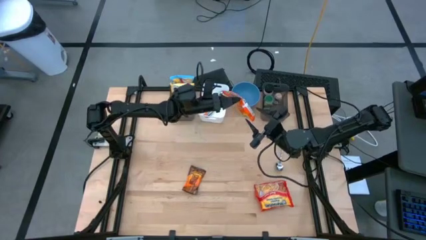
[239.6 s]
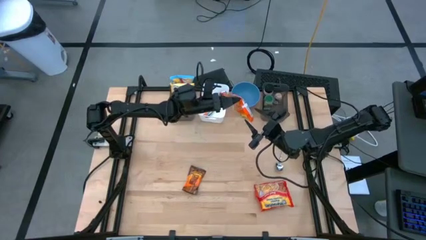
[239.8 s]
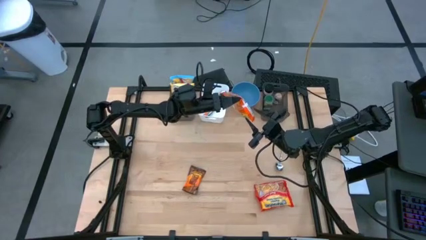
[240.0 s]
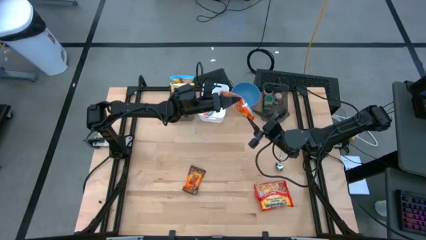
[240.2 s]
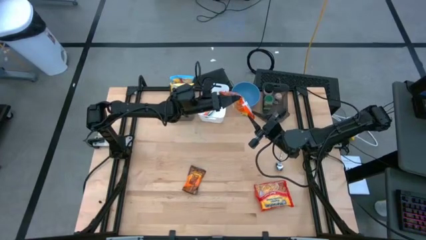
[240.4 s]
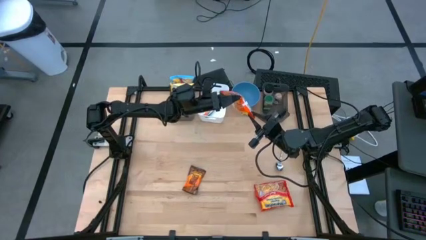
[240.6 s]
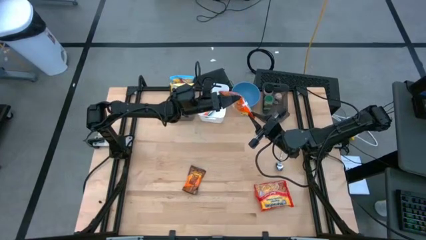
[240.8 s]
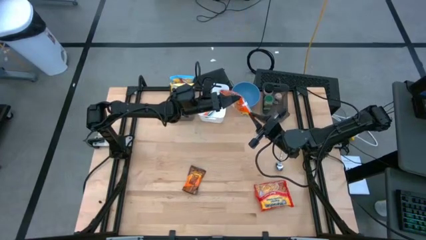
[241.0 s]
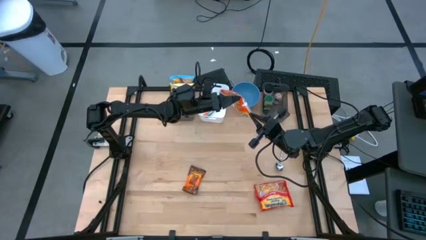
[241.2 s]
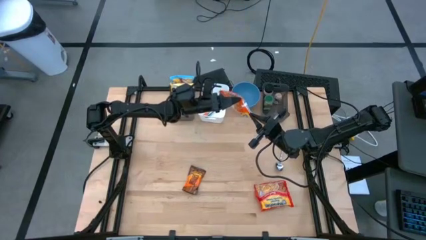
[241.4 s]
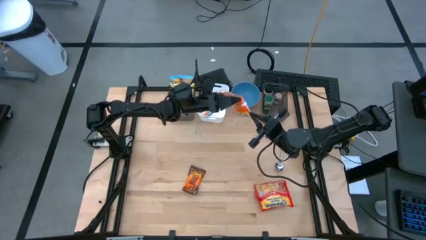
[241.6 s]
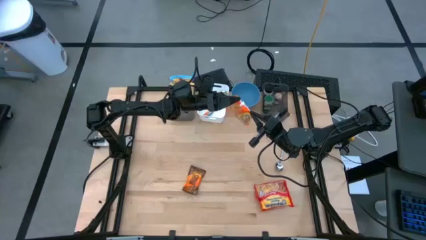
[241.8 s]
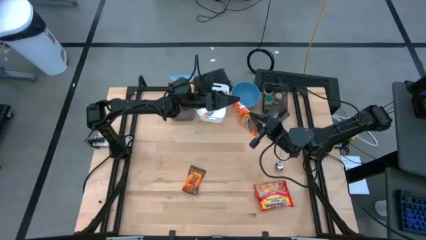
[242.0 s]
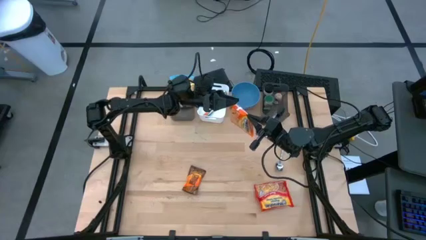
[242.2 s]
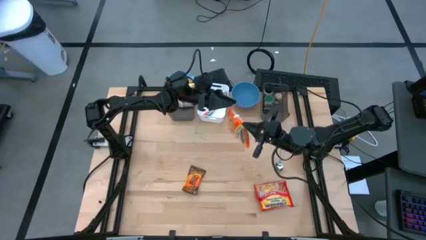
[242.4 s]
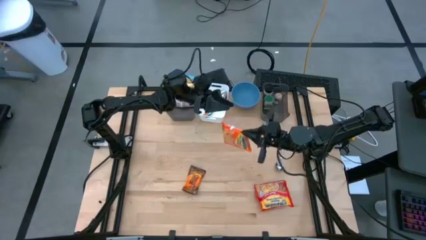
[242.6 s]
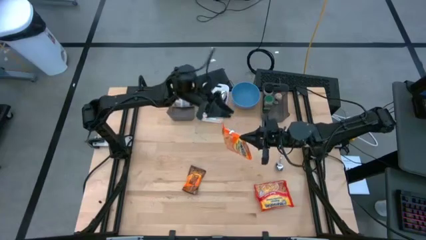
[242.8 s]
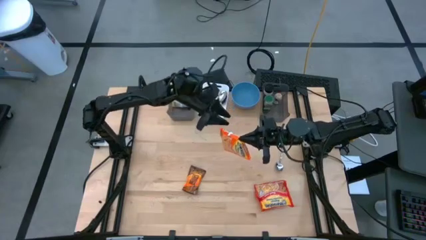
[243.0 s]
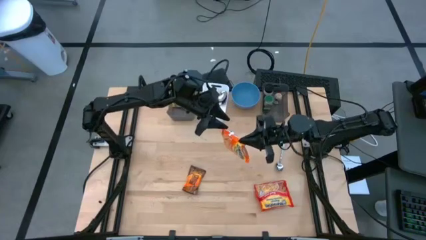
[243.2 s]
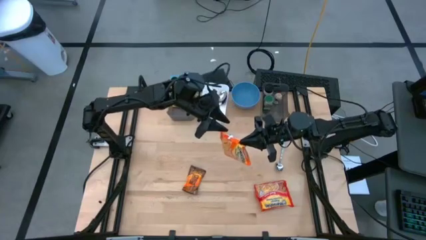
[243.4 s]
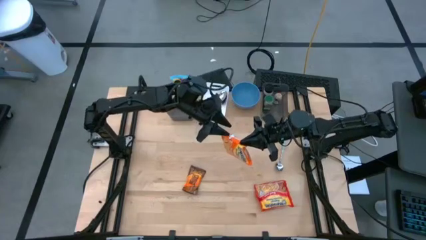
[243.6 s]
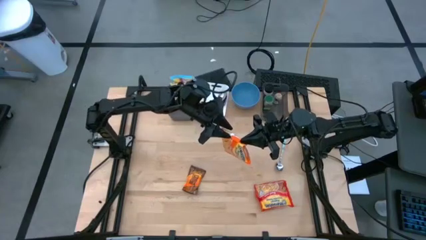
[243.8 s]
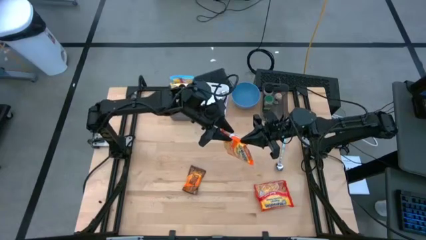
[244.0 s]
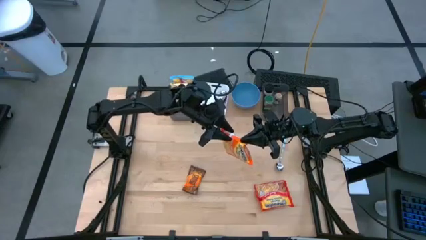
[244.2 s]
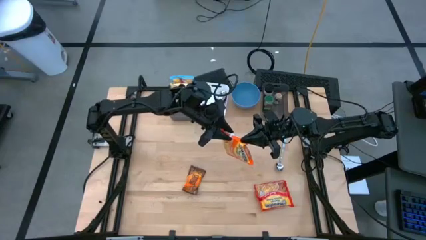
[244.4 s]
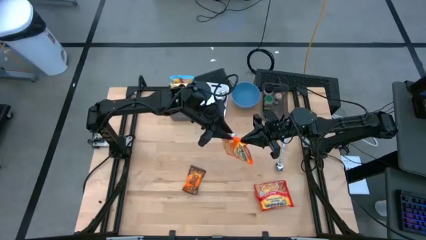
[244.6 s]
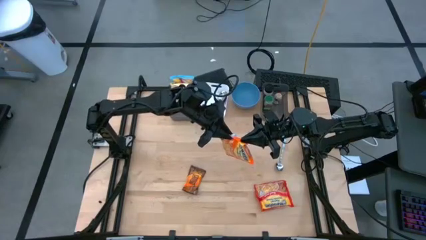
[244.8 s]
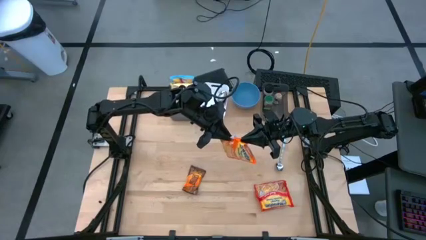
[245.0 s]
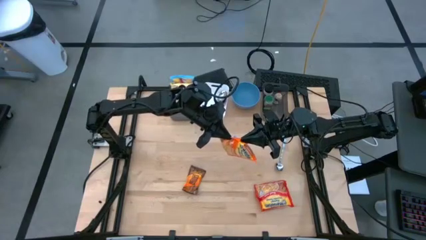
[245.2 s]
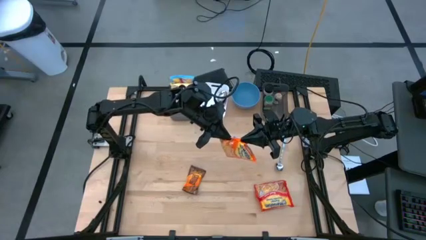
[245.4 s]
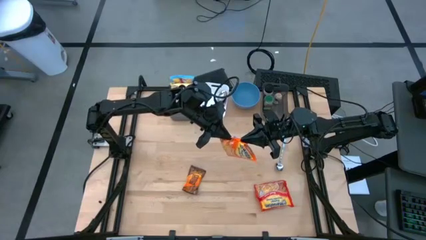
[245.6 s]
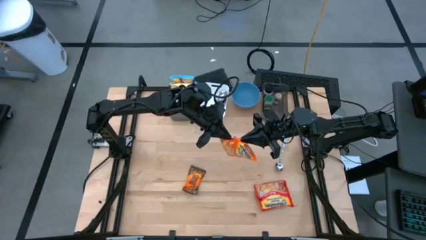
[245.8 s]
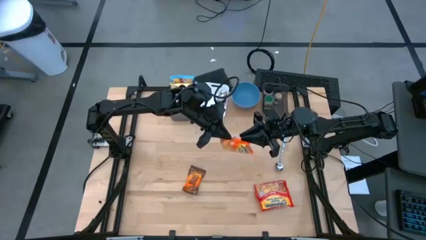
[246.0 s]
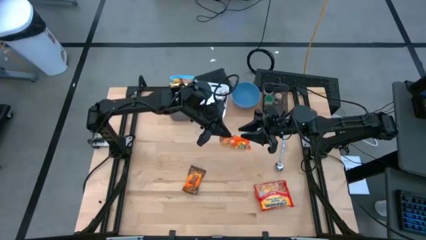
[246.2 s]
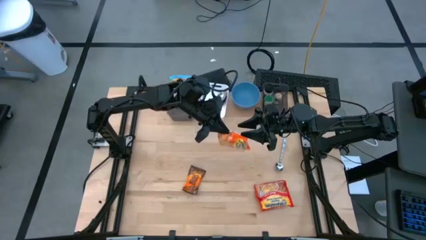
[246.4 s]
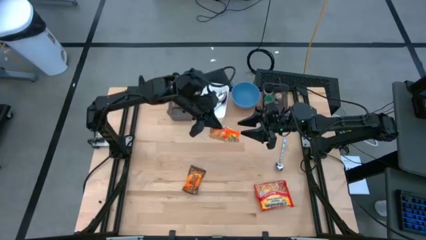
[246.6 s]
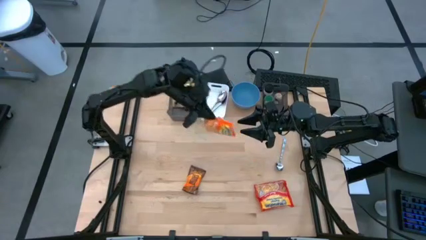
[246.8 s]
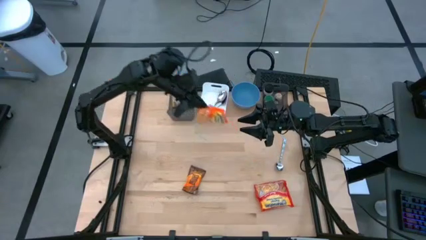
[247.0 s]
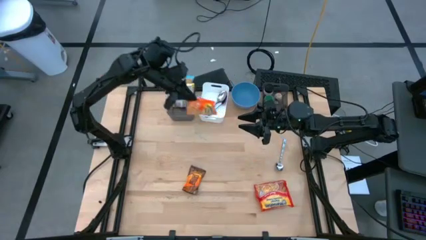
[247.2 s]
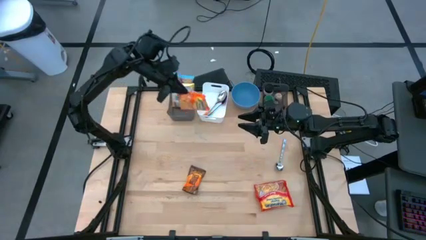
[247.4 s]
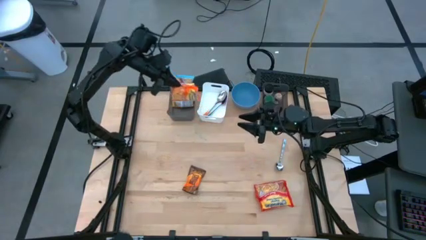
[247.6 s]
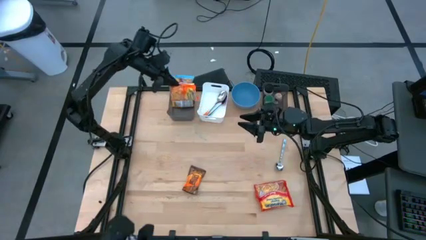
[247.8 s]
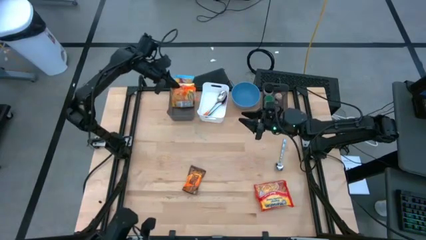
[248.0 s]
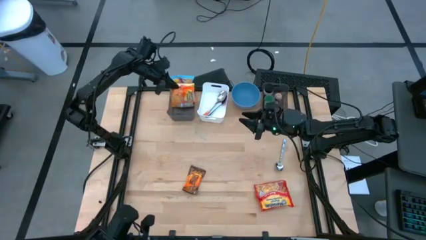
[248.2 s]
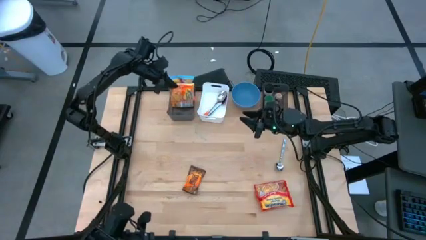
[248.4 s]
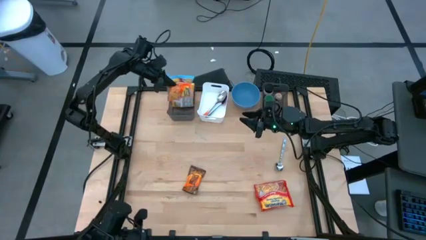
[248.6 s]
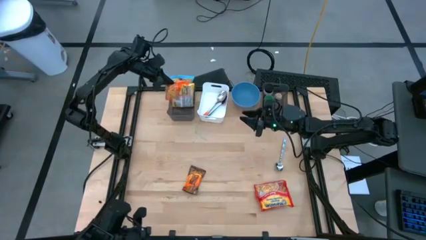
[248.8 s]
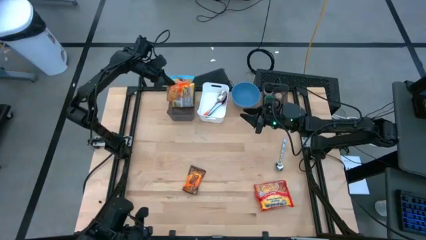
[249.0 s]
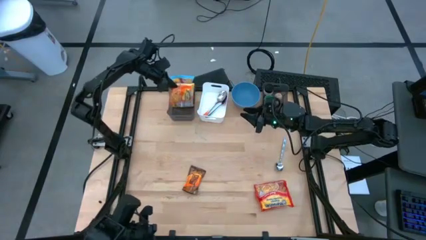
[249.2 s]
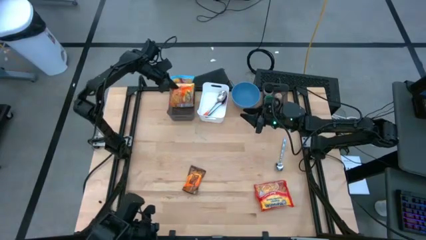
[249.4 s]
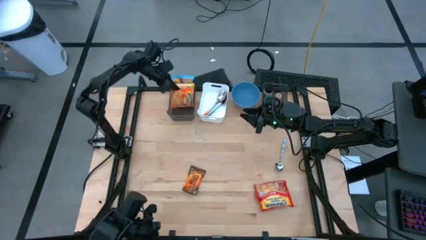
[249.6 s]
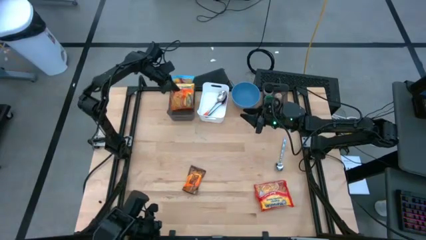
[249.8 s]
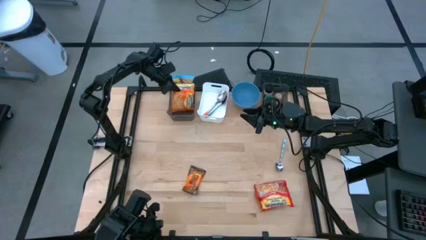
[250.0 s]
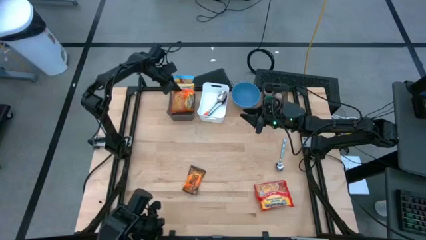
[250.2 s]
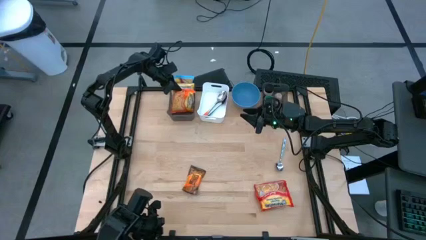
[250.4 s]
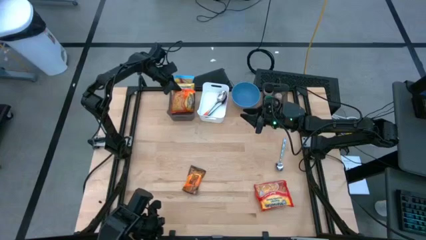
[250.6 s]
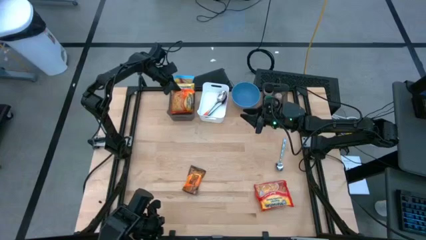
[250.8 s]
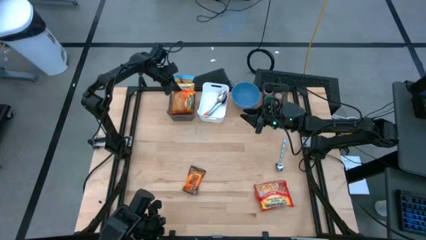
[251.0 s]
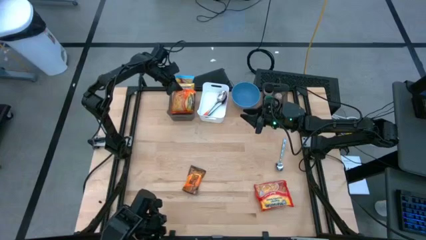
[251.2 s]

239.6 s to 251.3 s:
Task: Pick & Place Food Item
Put the orange noodle pack into the left black bin

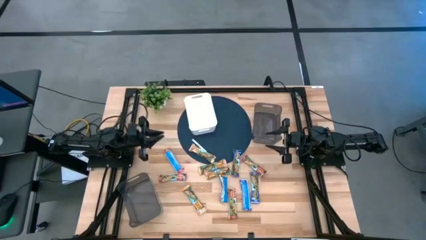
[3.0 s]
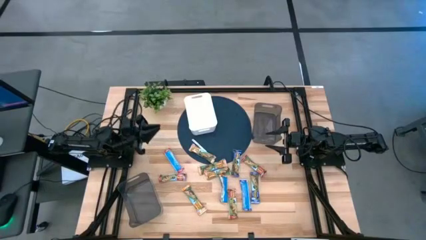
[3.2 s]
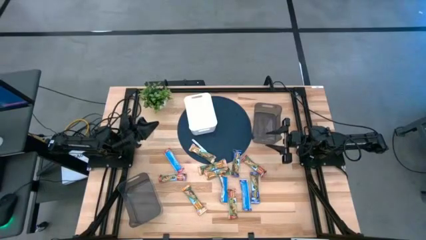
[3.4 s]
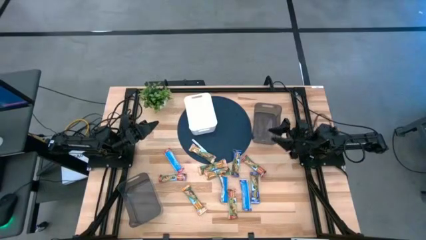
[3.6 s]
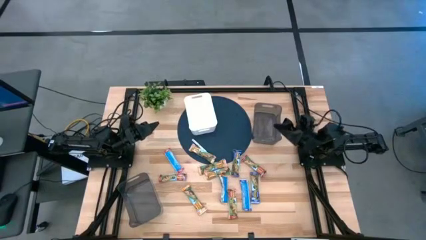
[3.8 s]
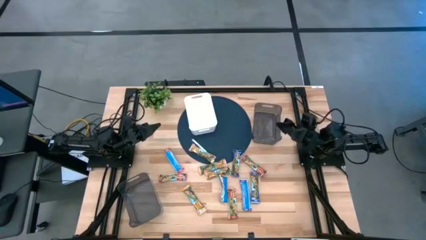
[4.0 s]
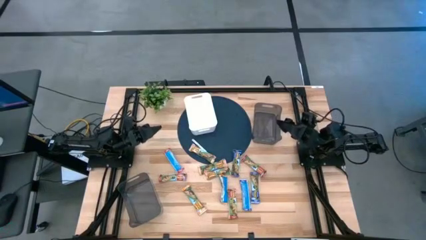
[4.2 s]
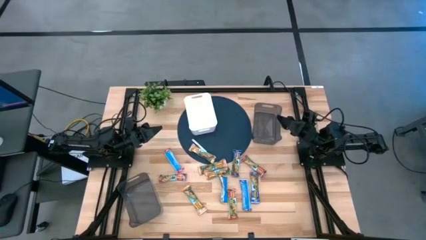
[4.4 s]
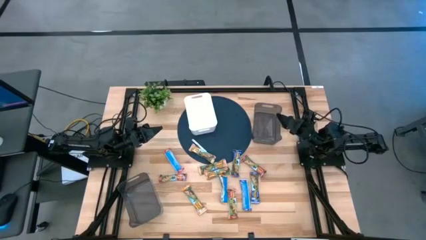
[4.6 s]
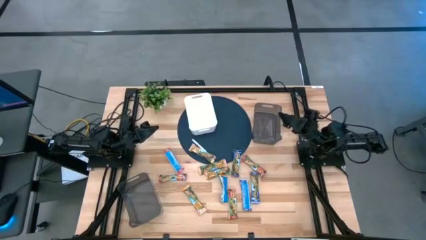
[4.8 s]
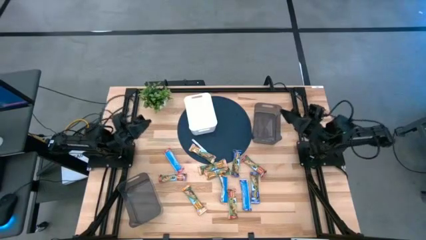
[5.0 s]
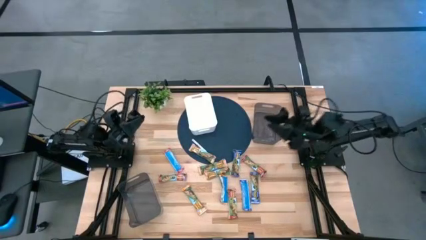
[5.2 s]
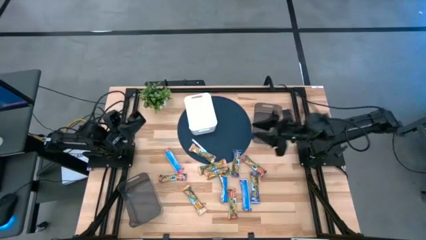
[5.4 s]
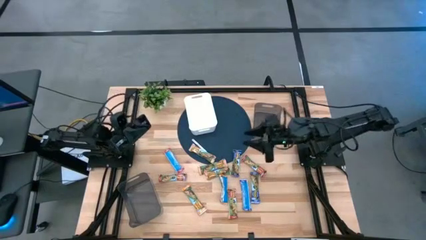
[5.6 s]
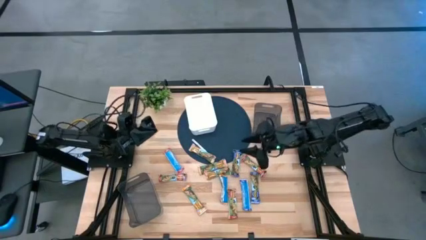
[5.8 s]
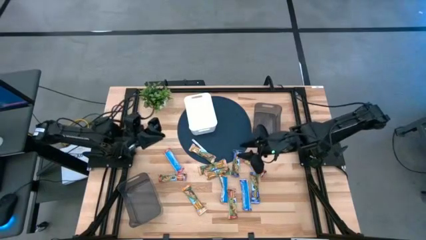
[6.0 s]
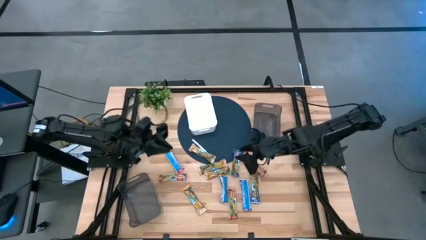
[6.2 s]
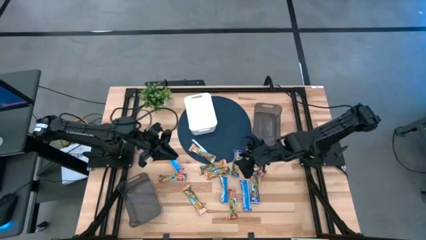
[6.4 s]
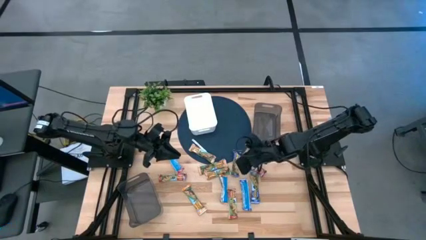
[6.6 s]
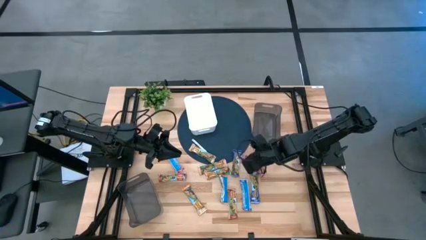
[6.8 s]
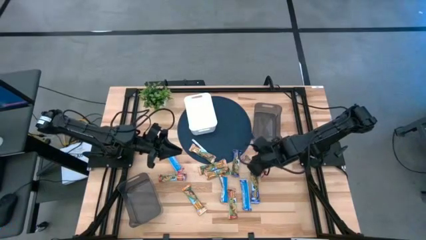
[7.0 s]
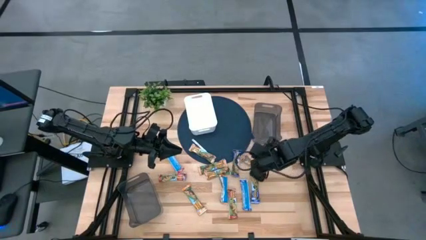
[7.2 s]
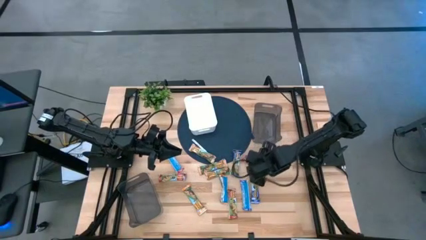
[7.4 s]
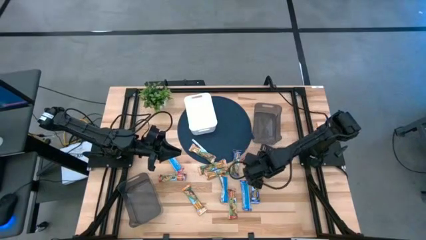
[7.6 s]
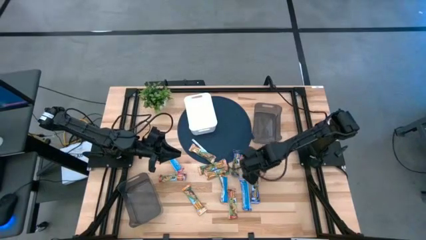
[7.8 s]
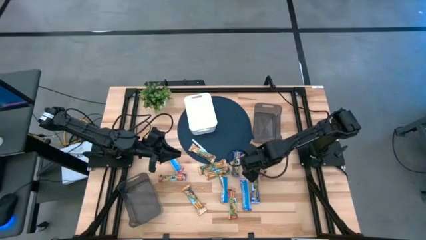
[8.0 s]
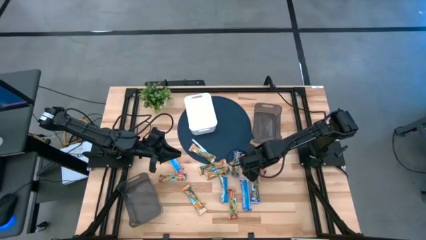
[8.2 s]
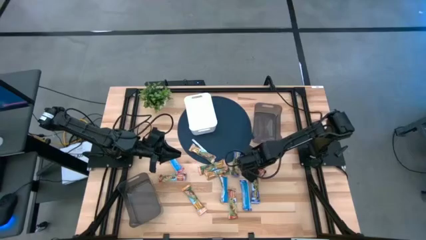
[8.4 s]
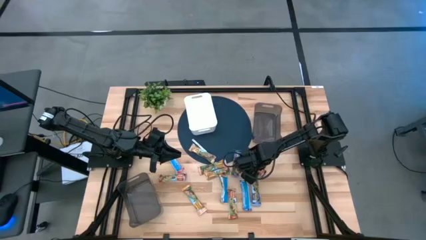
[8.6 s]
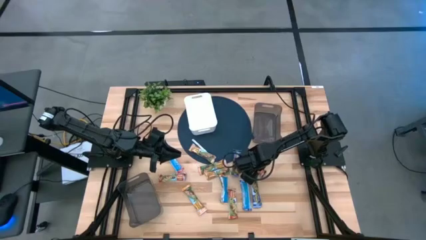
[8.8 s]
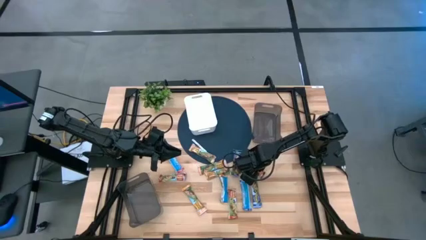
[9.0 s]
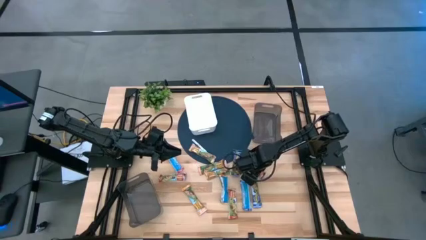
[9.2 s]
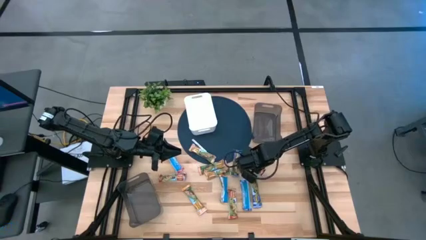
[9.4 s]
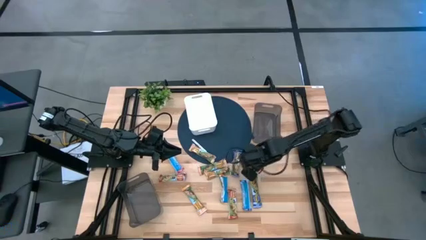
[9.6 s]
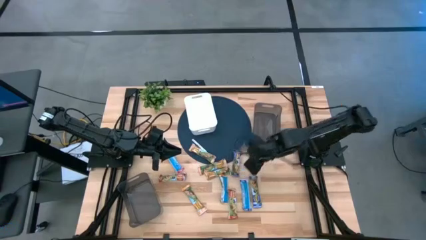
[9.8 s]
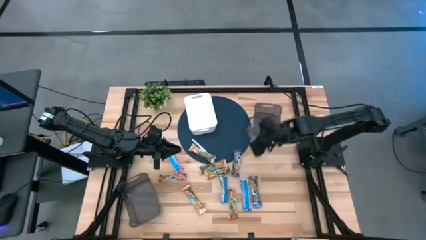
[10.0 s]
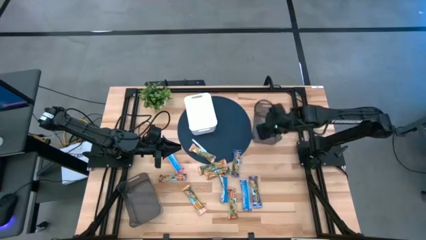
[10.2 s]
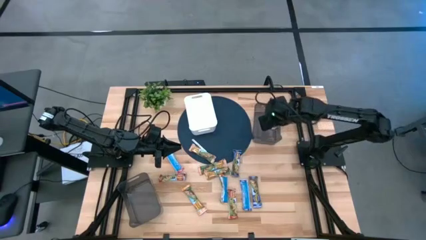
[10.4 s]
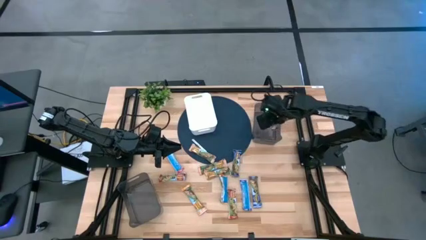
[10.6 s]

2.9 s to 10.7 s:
Task: Pick and place Granola Bars by type
Put the red granola bar into the top black bin
